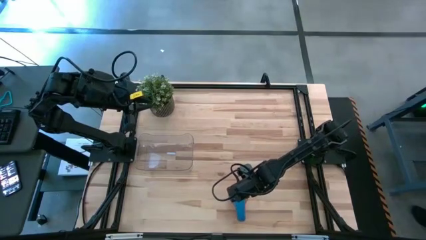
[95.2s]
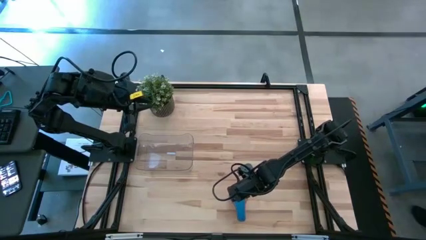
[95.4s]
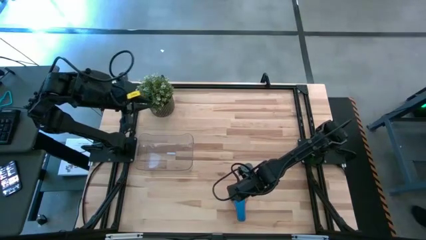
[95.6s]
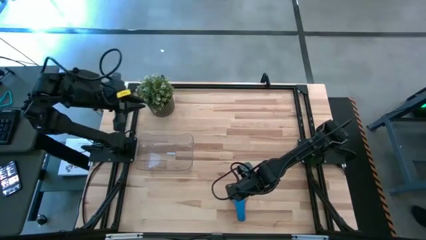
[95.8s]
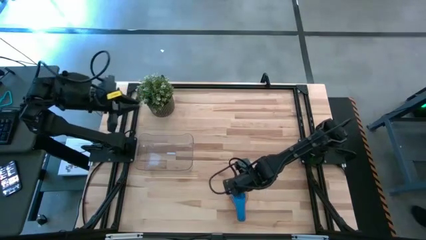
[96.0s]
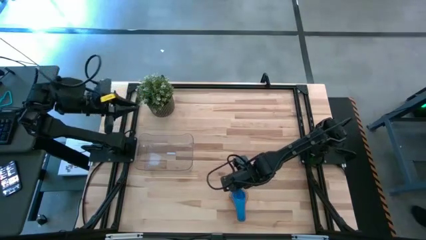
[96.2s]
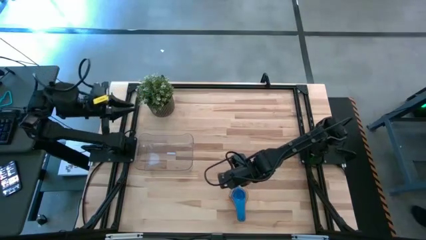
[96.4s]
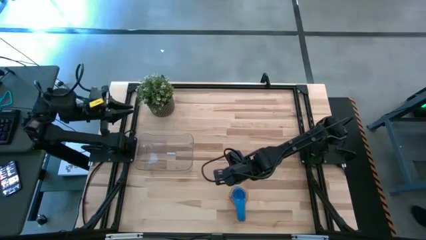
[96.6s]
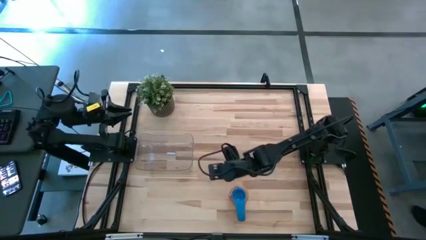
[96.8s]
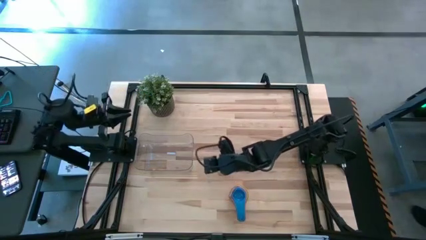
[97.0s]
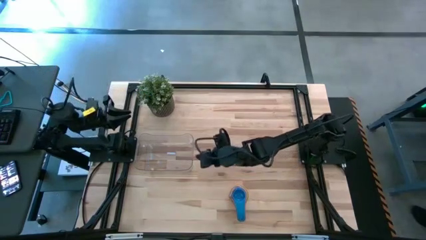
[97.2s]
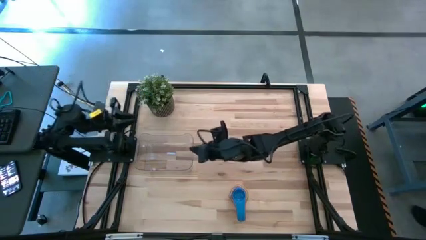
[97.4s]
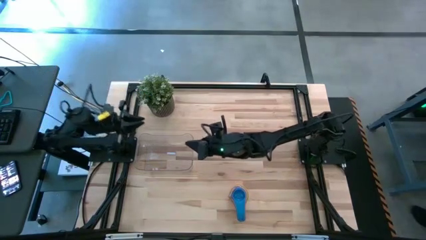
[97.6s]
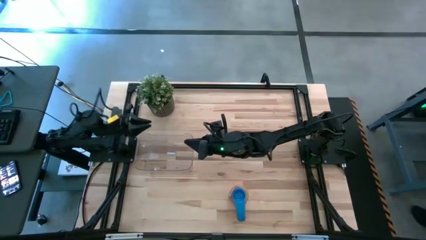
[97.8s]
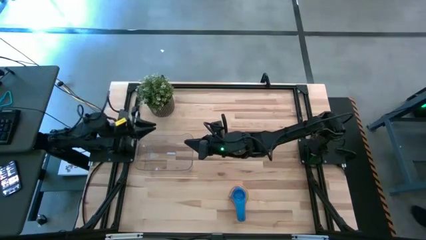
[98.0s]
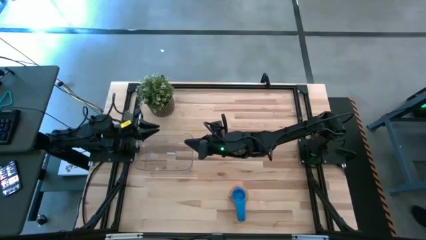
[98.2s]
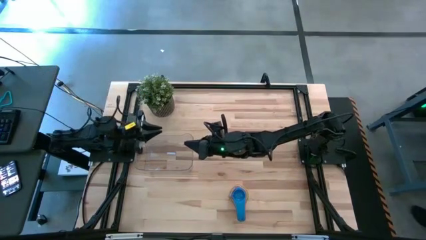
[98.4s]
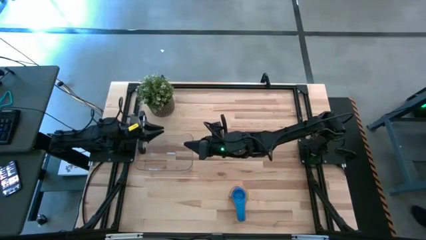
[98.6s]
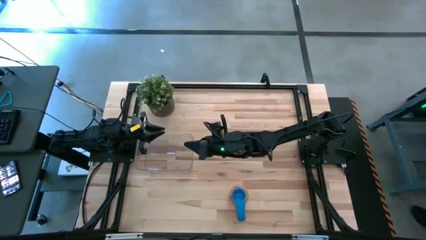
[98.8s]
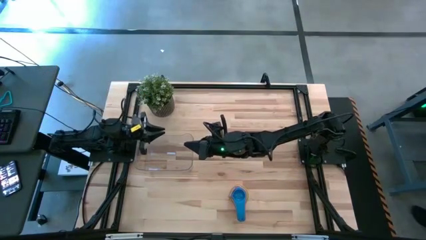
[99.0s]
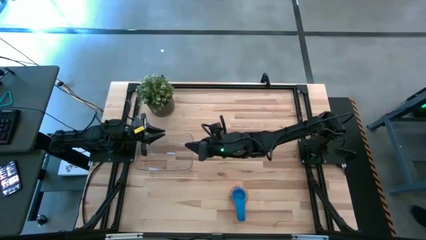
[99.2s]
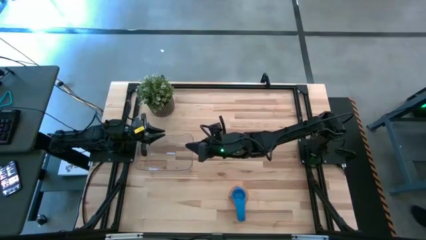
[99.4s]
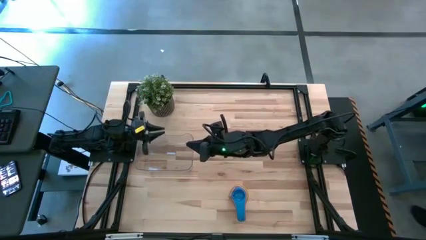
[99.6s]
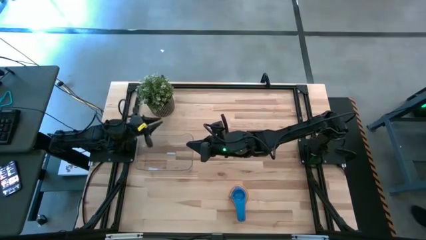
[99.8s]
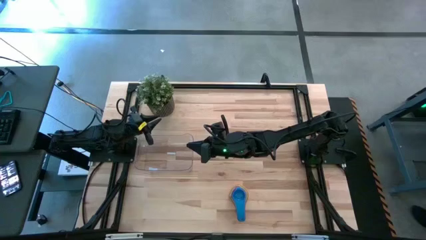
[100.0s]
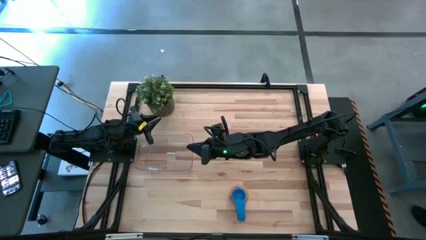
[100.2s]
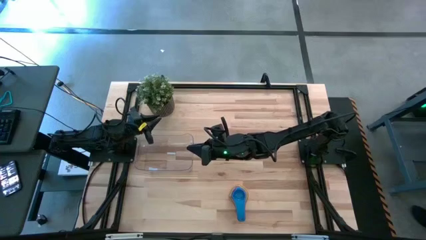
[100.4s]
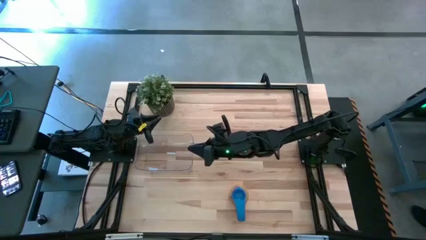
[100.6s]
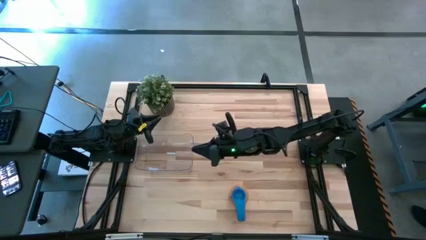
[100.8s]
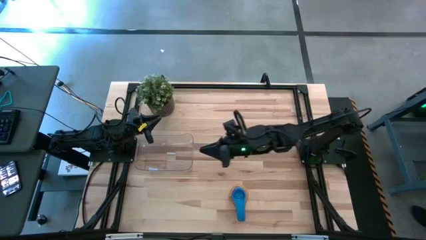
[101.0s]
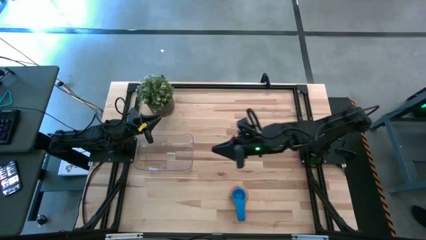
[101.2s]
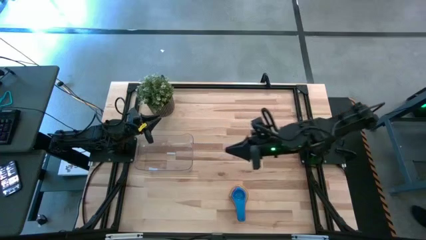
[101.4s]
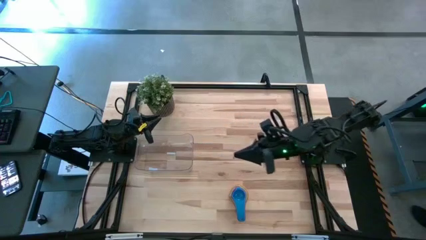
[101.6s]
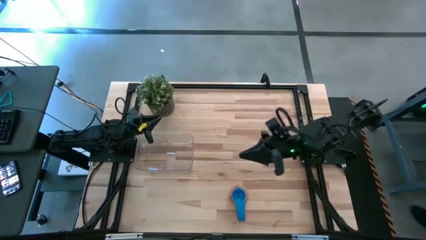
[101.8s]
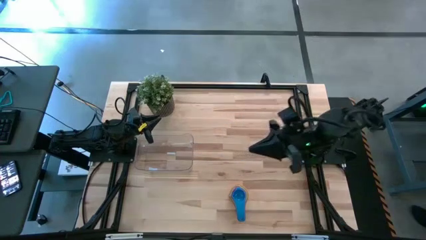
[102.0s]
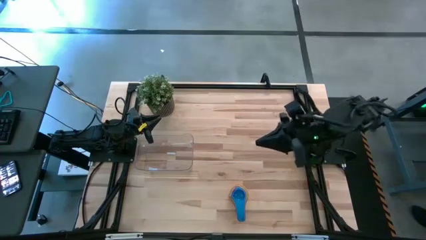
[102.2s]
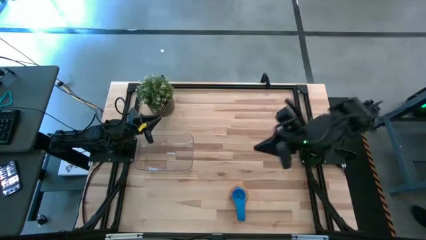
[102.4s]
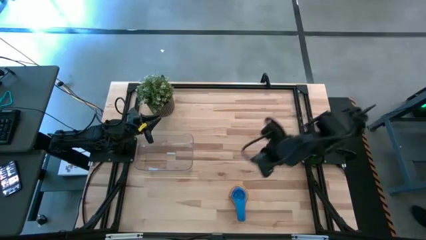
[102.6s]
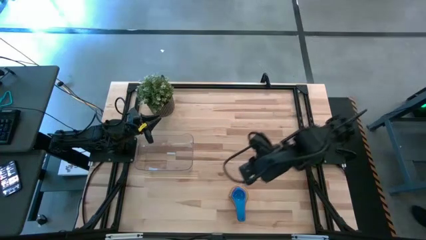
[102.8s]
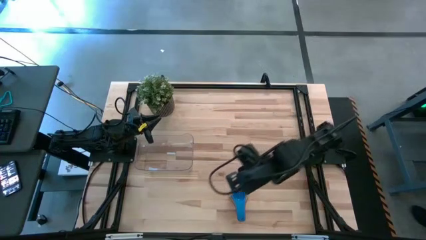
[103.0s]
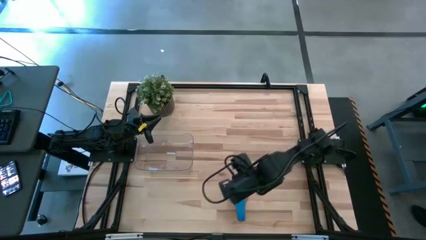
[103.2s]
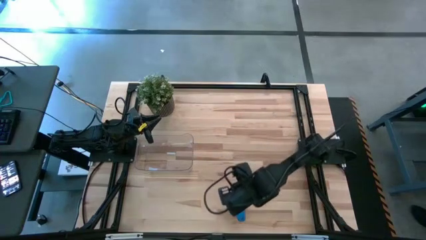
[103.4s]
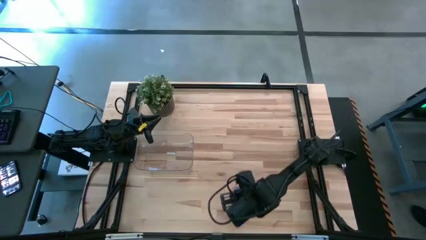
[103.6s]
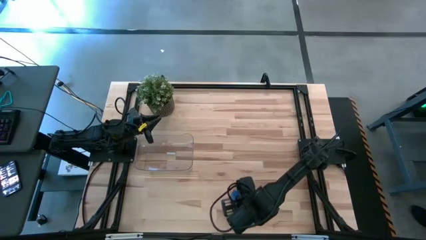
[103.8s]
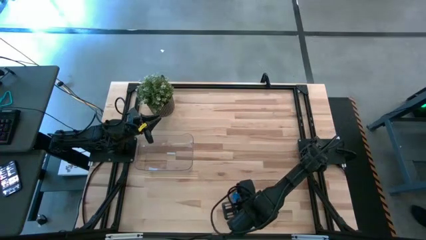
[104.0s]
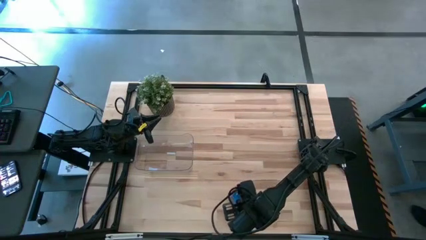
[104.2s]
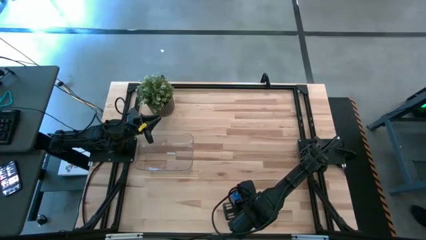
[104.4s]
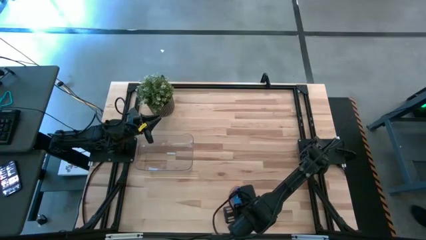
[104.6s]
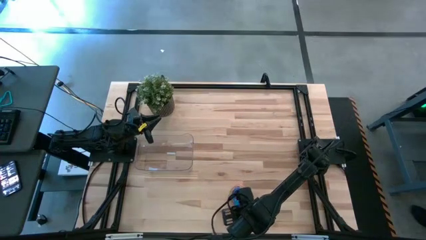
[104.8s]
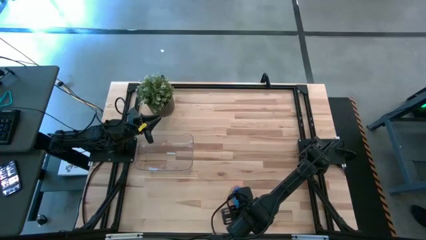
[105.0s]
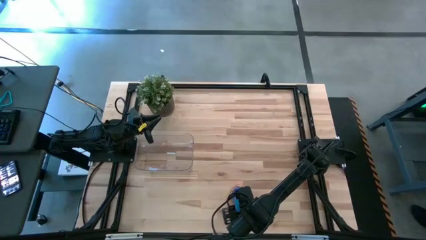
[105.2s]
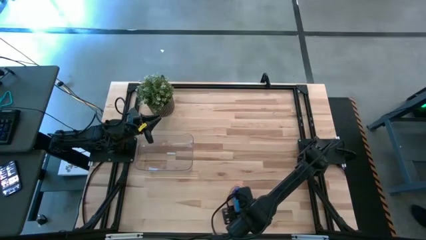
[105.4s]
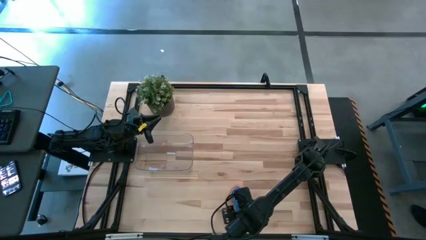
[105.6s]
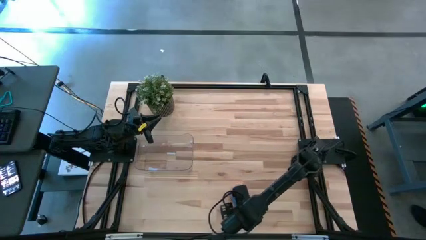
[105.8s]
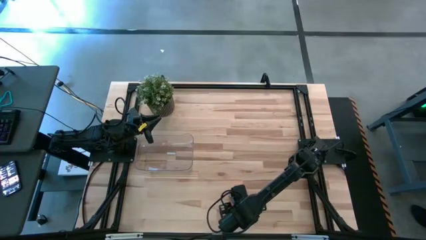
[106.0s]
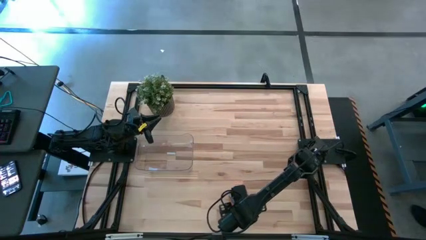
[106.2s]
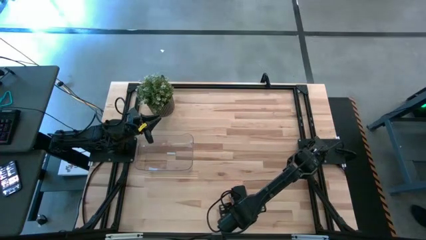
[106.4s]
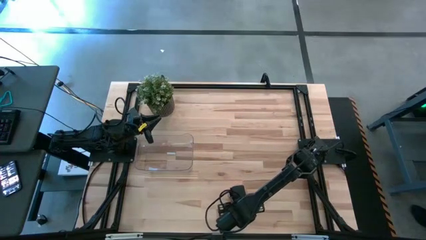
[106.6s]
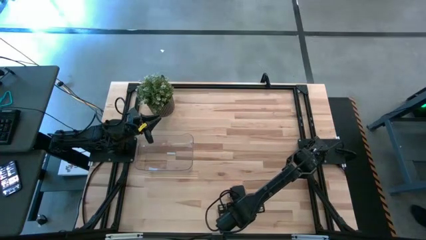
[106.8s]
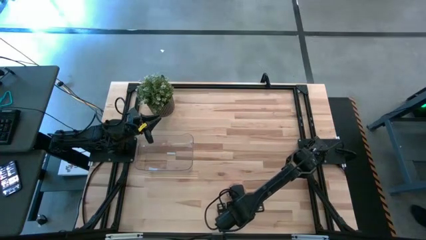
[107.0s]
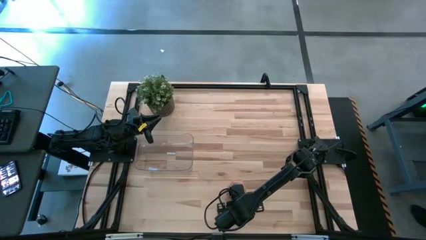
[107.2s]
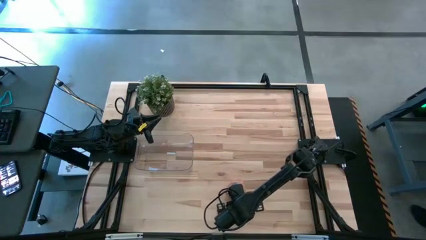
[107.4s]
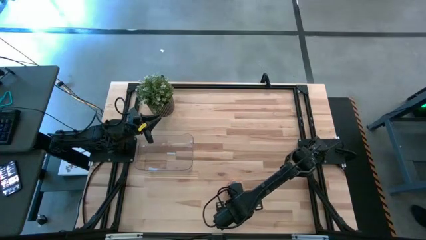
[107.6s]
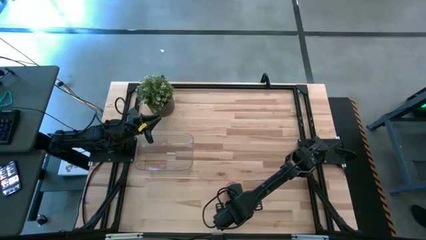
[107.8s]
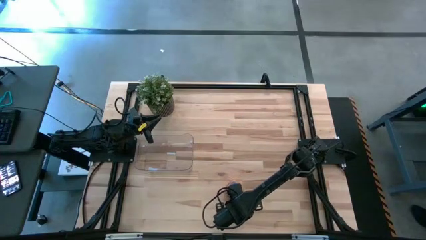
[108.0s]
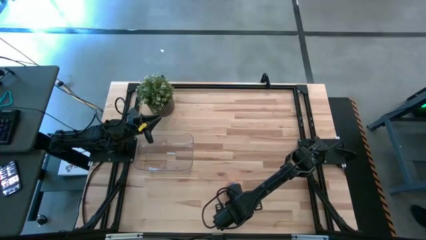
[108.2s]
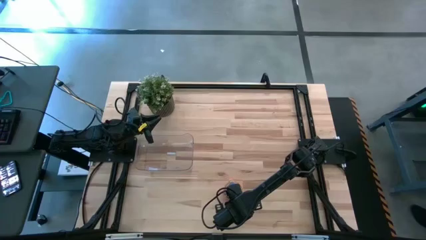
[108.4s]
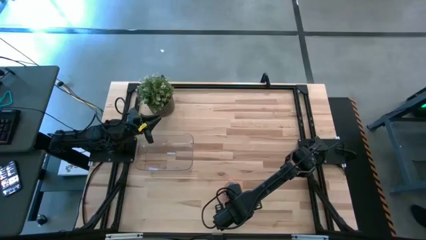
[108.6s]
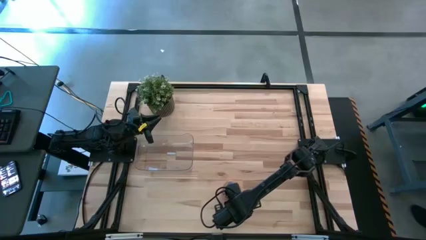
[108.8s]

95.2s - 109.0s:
Task: Nest measuring cups in basket
Put the nested measuring cups into the transparent bin

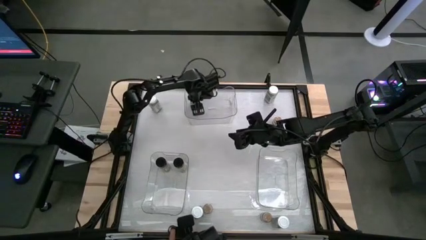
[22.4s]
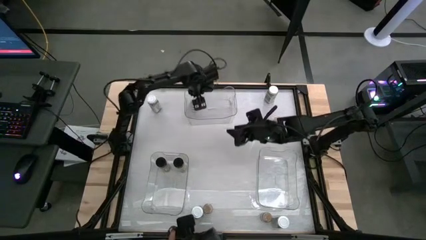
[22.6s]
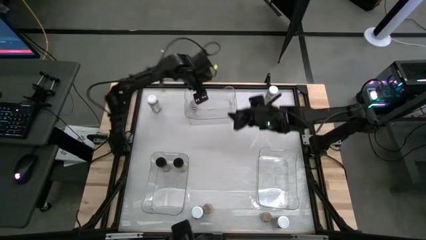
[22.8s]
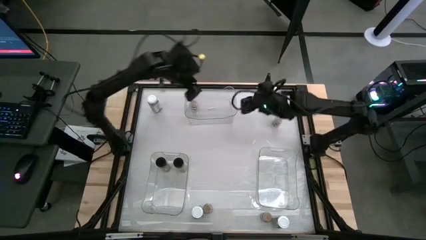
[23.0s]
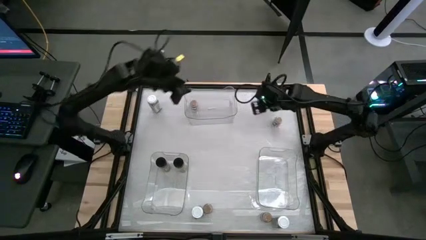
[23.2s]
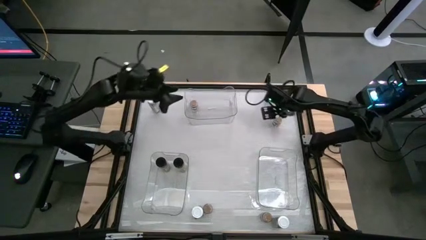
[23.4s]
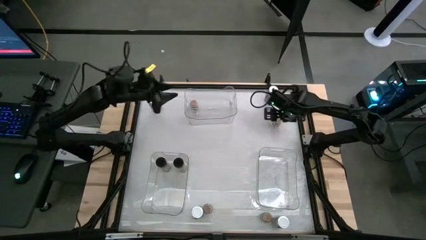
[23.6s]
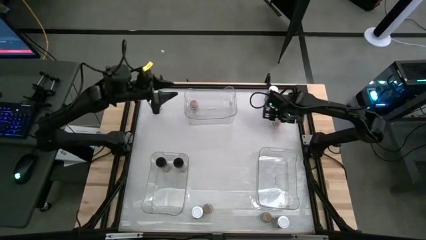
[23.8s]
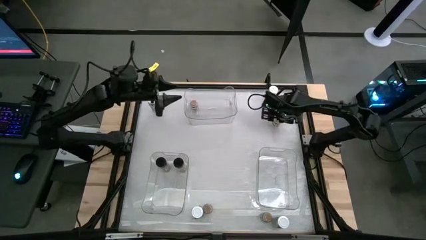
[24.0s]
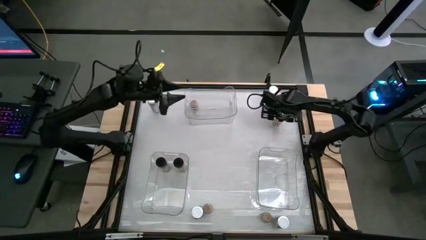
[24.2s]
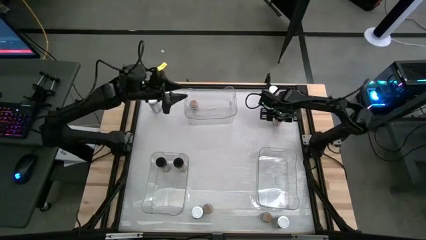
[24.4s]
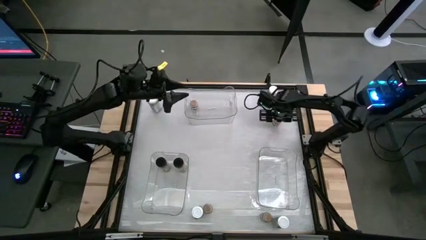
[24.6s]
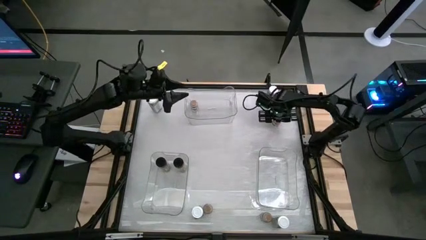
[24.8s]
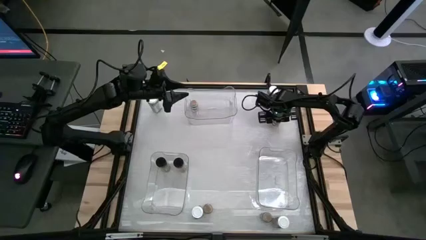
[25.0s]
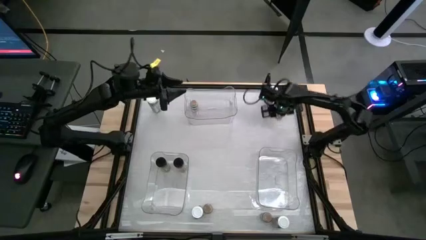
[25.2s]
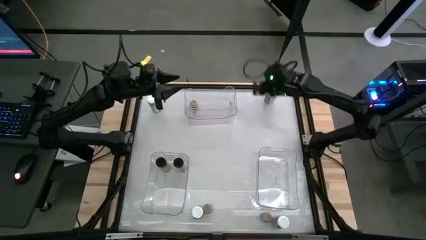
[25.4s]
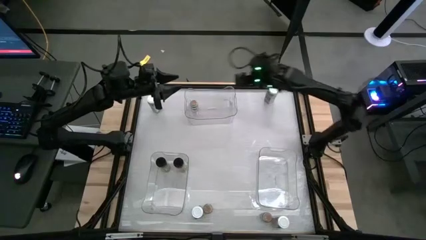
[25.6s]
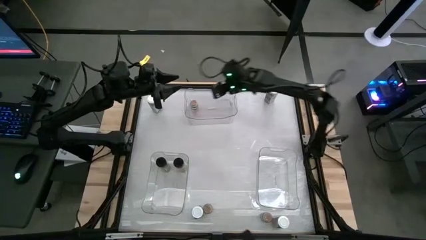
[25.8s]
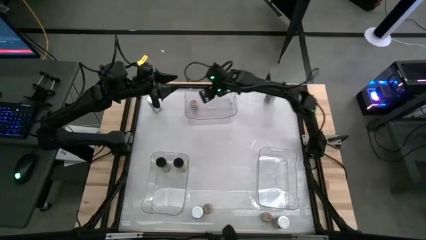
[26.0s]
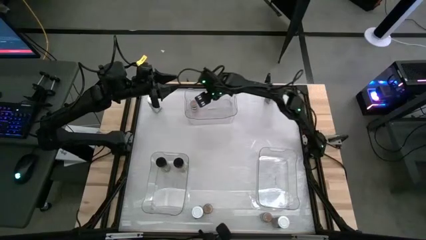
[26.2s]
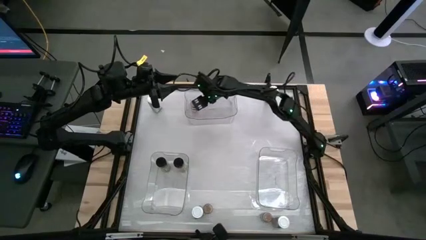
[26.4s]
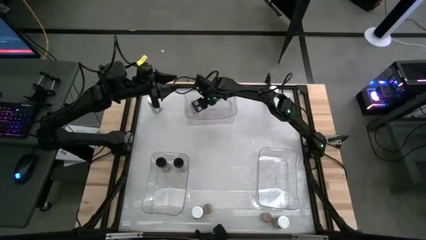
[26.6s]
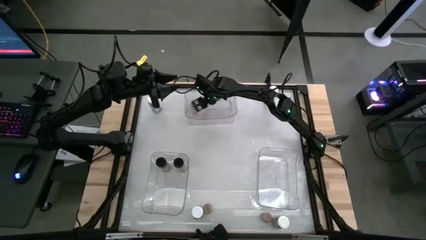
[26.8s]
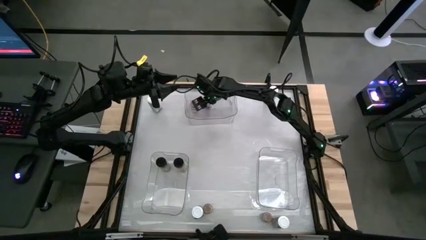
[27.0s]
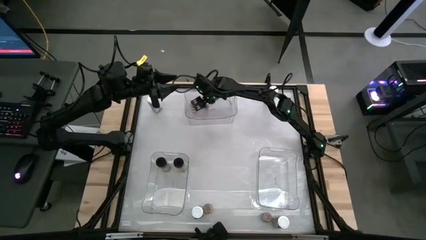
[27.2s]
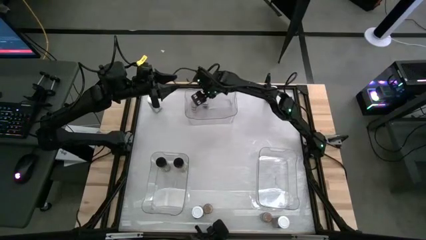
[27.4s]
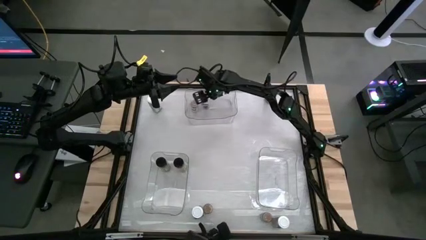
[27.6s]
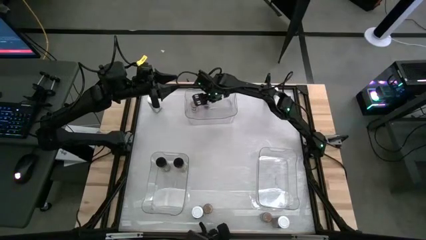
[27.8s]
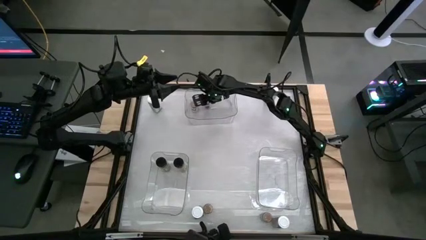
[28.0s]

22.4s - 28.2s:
Task: Sort spices by type
Put the brown seasoning bottle into the middle transparent bin
